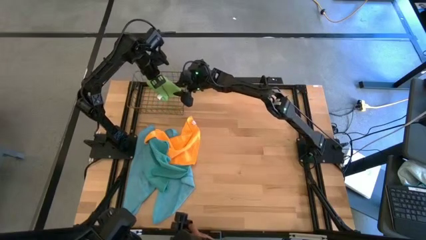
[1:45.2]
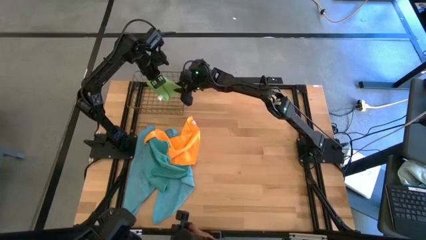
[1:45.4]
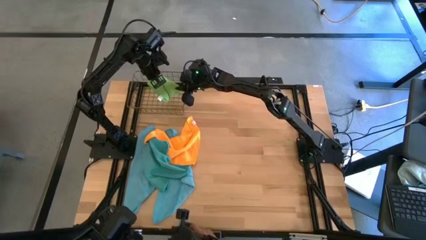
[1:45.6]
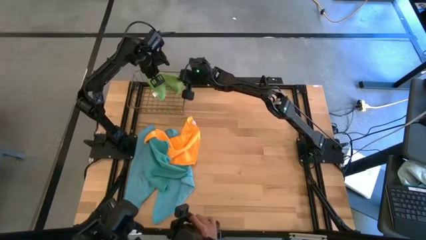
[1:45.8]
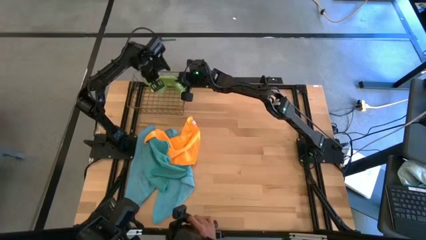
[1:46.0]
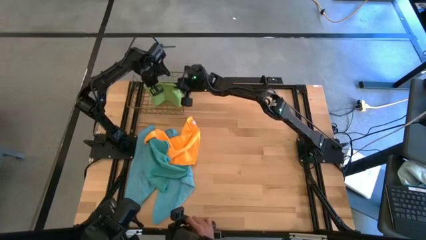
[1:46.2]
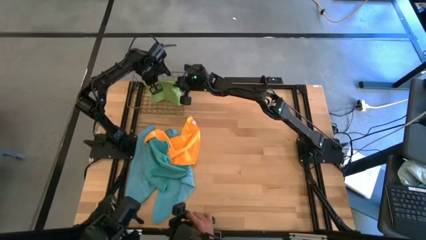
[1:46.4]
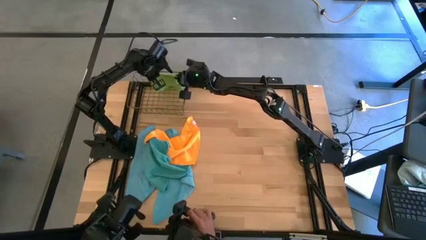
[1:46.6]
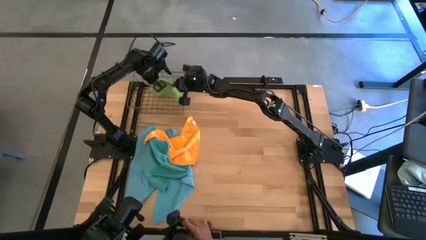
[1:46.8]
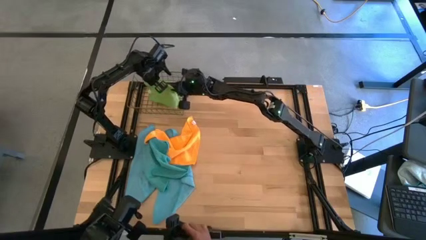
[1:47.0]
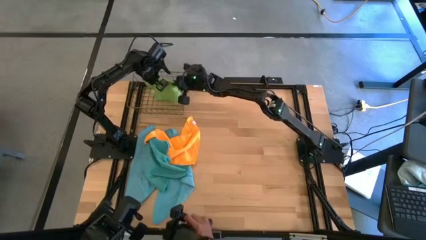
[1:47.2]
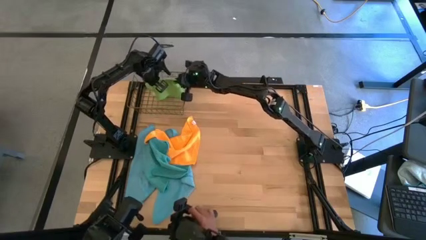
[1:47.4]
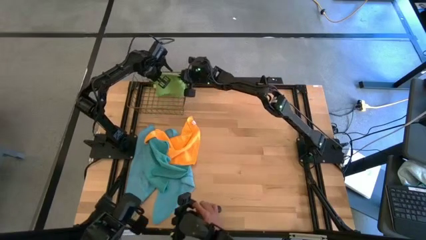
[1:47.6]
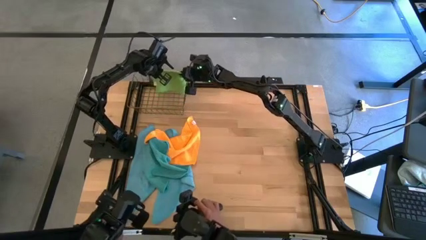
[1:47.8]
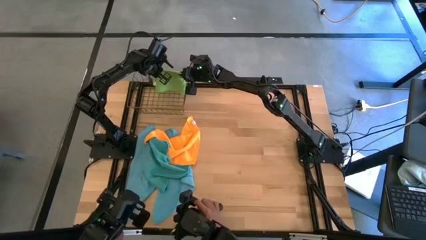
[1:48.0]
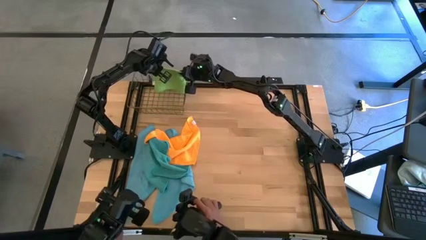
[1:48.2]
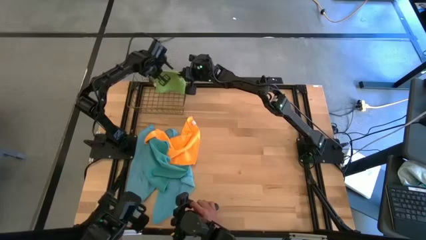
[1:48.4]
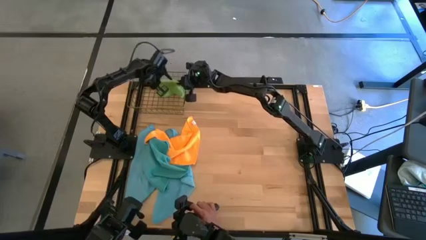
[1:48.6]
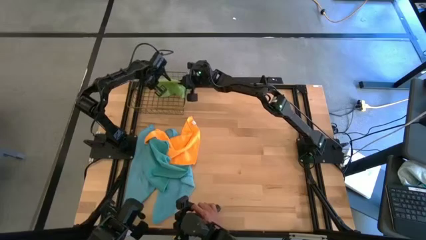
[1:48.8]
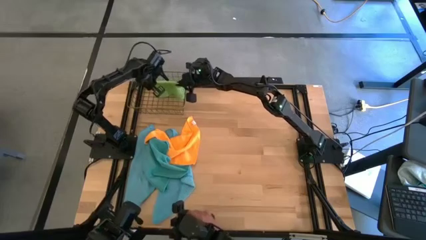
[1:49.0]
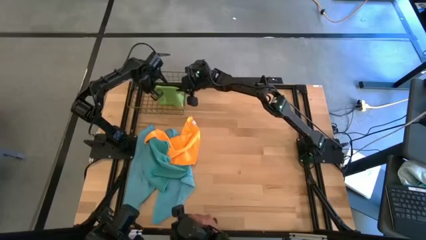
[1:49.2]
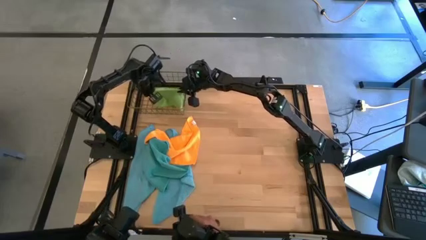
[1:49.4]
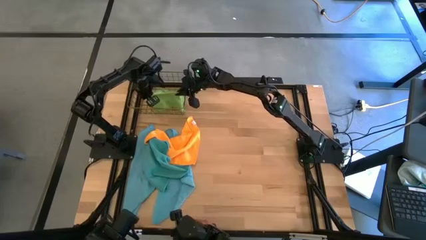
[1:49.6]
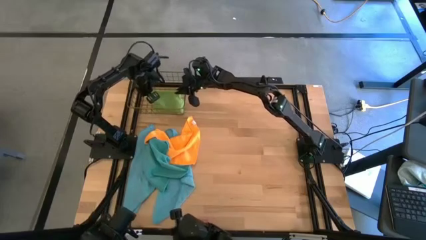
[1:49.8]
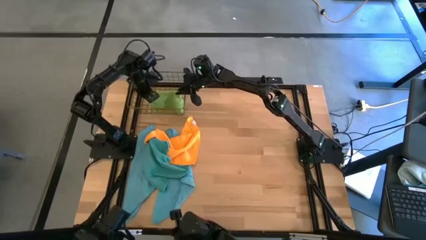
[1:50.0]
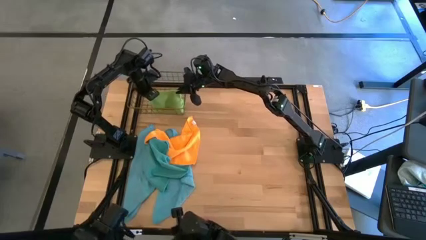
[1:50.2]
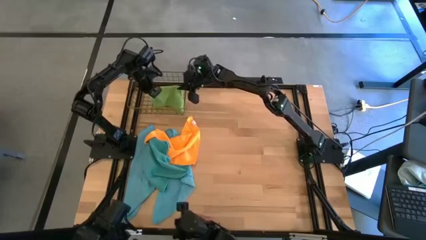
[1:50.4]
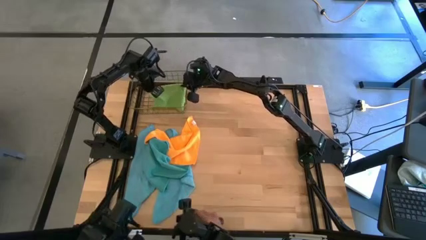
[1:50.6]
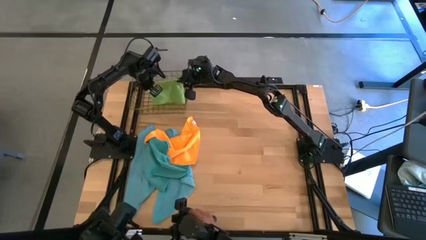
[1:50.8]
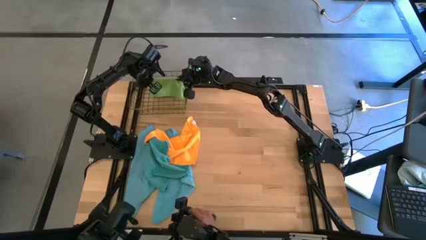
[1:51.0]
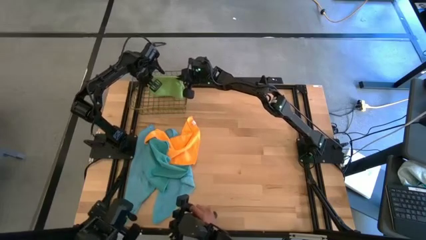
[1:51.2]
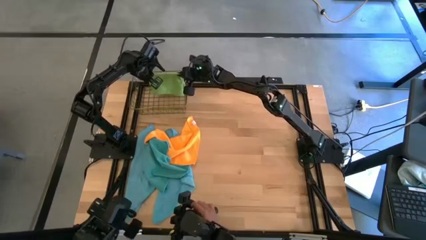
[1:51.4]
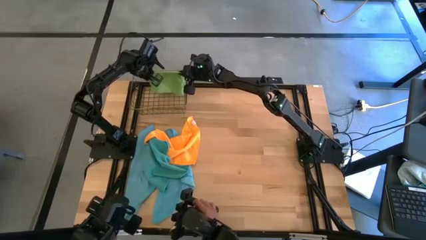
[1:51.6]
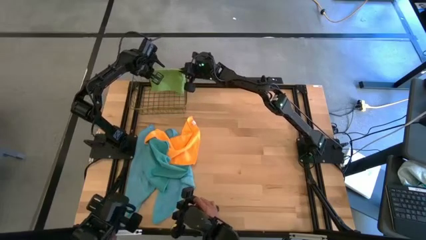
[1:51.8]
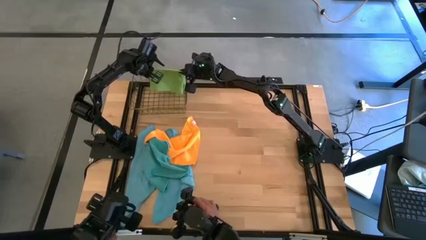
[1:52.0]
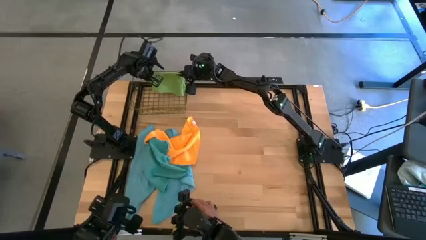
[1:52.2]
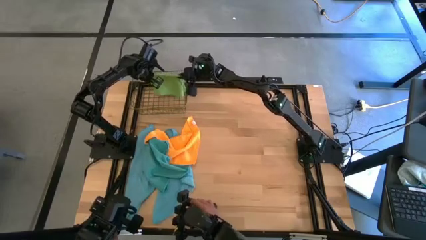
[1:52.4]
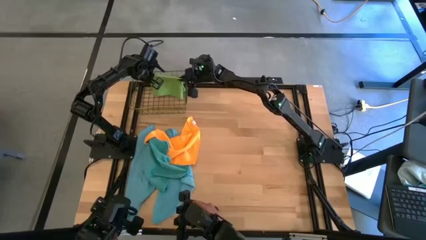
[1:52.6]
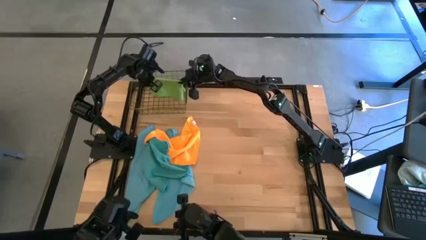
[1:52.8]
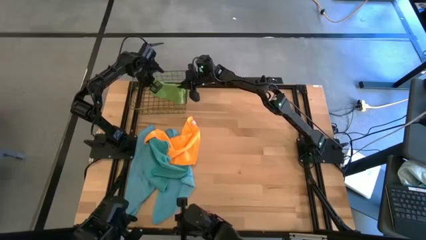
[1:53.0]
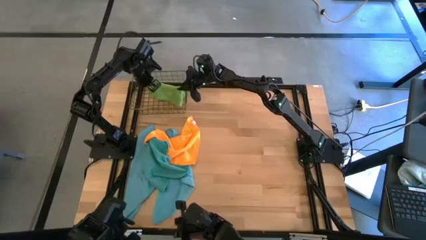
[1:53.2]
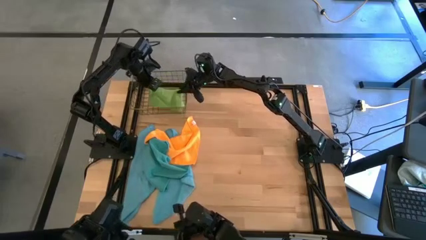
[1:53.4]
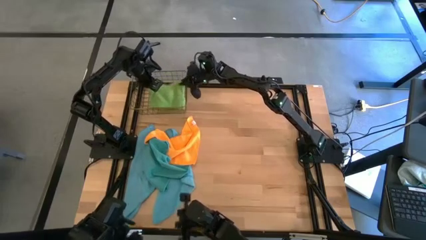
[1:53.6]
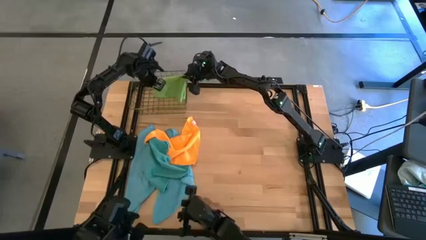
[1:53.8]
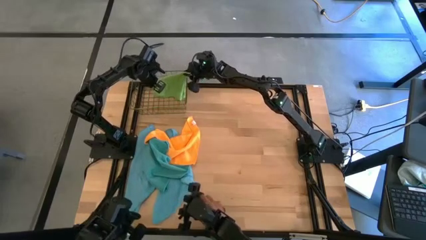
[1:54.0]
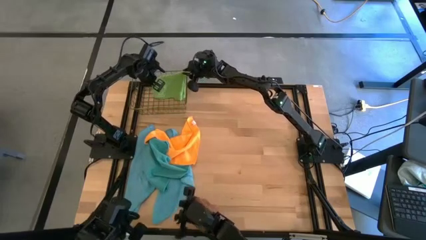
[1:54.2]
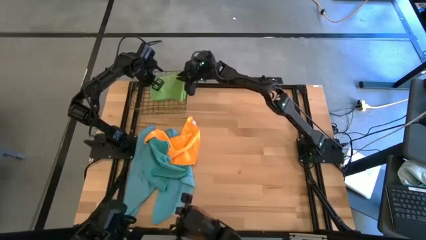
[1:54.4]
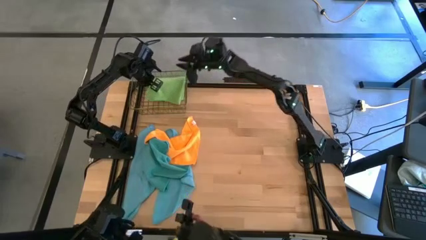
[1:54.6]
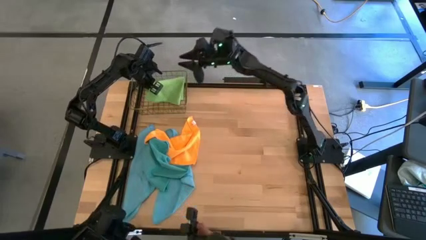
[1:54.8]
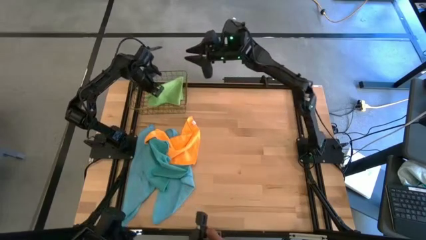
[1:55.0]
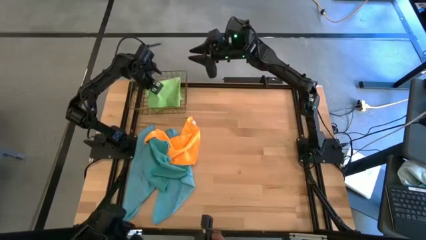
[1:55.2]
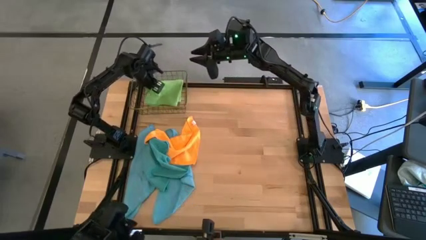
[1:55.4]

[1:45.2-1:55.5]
Task: Fold microfiber towels
Put the folded green microfiber cloth into the wire basket

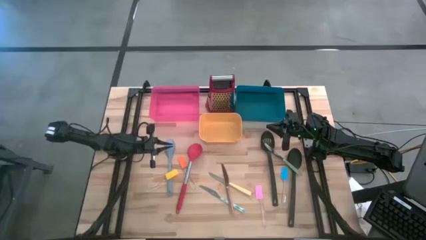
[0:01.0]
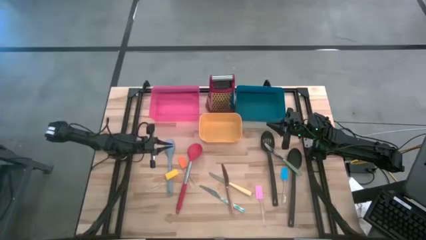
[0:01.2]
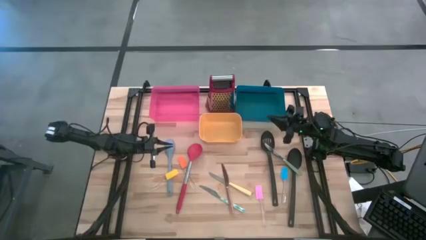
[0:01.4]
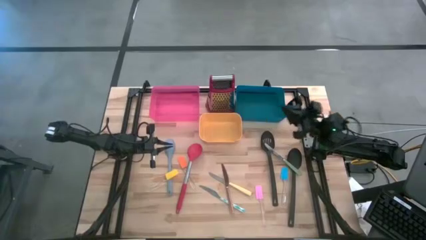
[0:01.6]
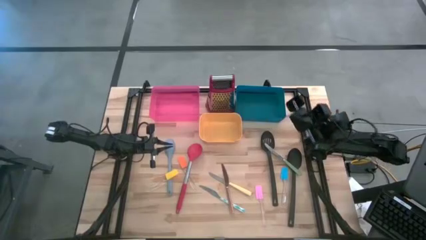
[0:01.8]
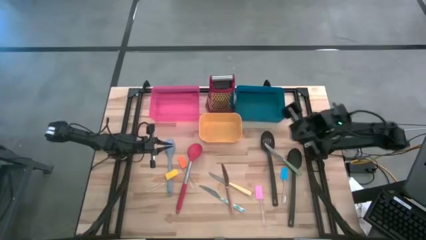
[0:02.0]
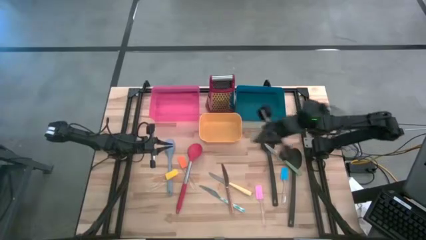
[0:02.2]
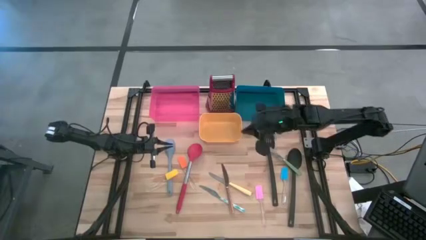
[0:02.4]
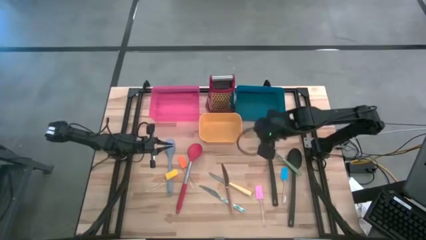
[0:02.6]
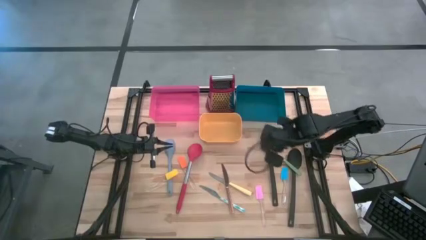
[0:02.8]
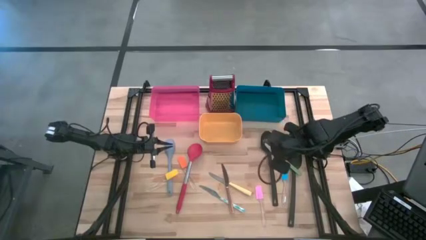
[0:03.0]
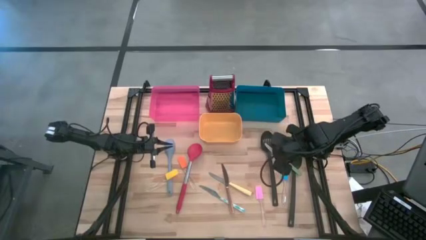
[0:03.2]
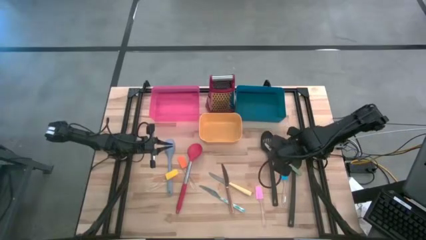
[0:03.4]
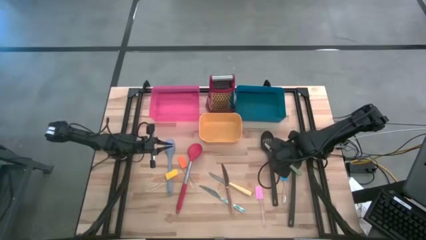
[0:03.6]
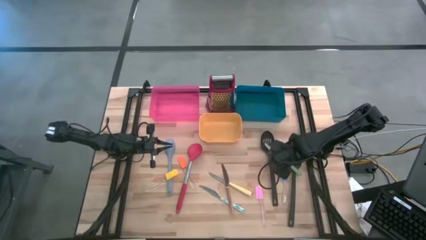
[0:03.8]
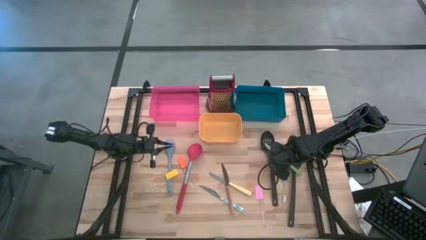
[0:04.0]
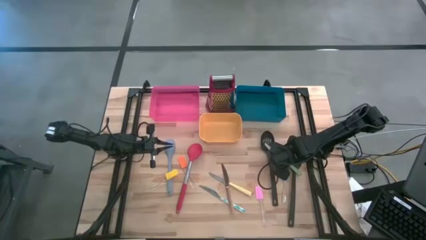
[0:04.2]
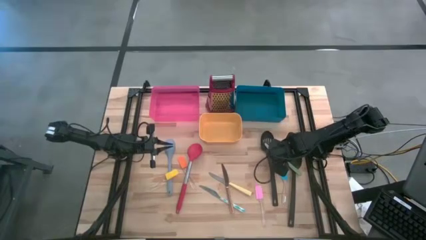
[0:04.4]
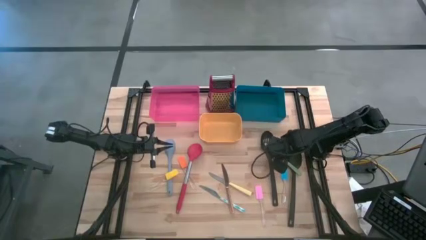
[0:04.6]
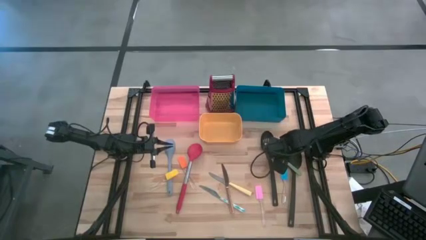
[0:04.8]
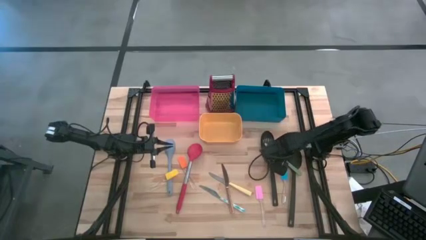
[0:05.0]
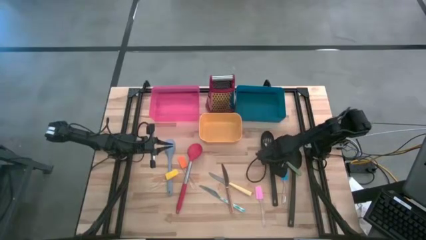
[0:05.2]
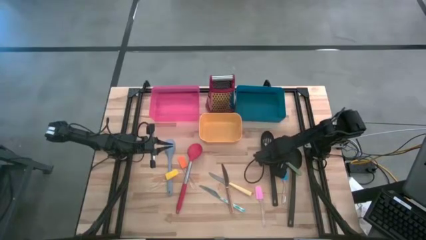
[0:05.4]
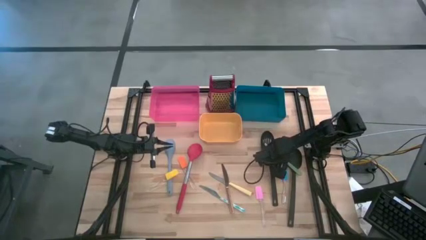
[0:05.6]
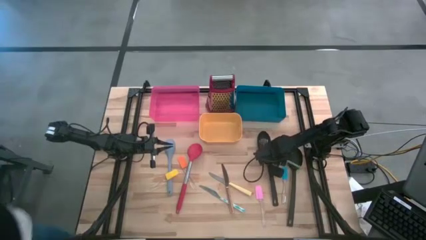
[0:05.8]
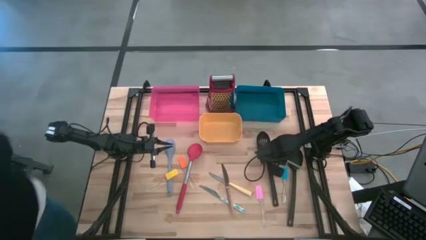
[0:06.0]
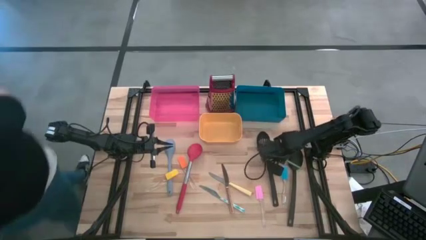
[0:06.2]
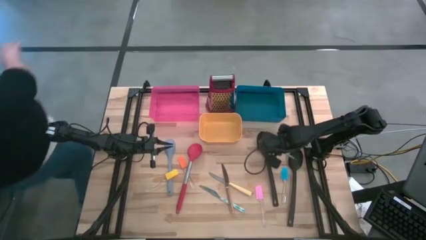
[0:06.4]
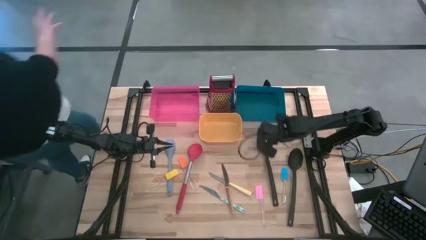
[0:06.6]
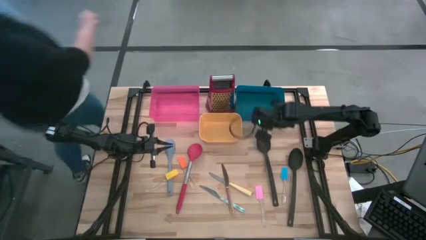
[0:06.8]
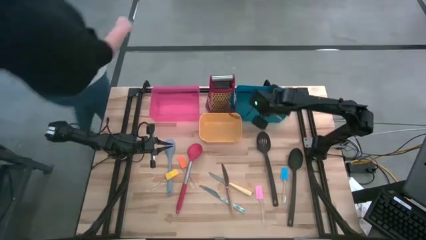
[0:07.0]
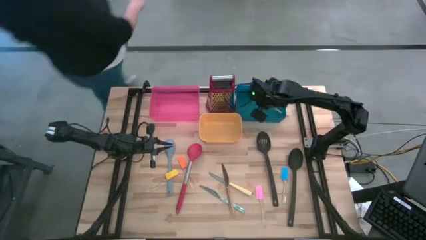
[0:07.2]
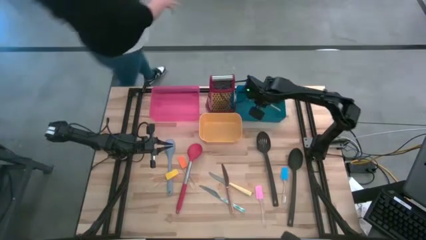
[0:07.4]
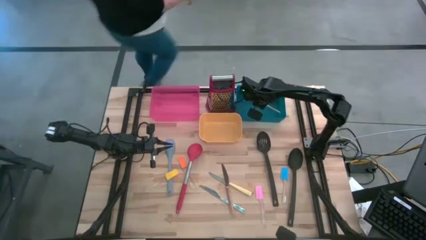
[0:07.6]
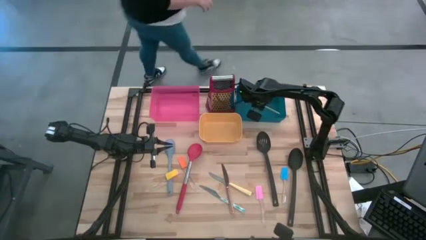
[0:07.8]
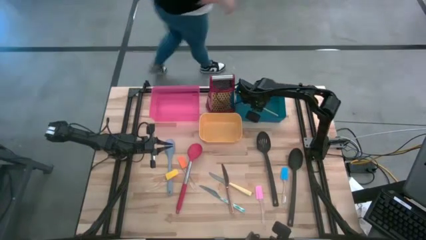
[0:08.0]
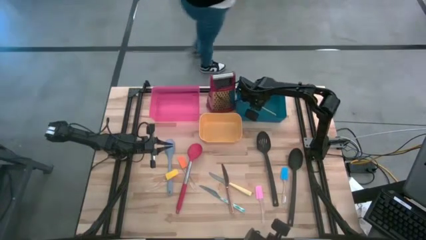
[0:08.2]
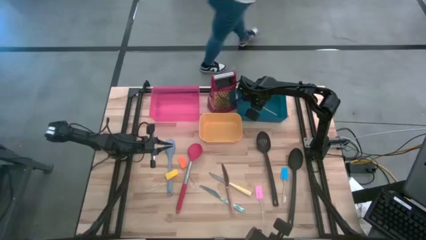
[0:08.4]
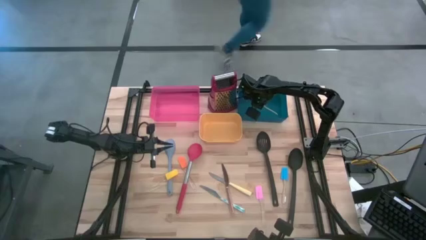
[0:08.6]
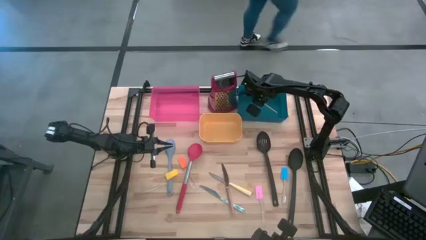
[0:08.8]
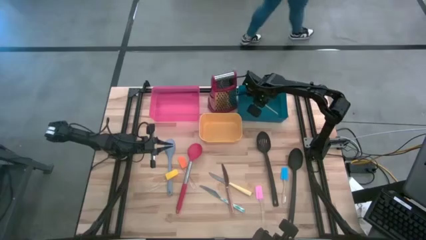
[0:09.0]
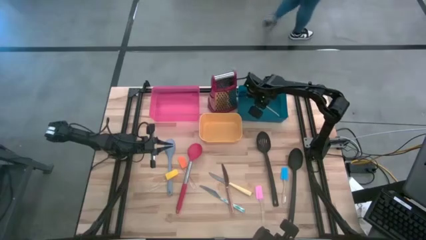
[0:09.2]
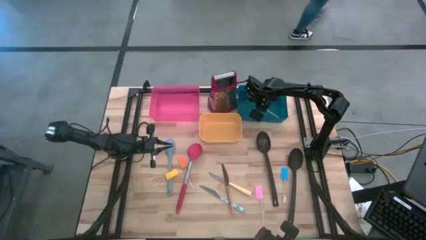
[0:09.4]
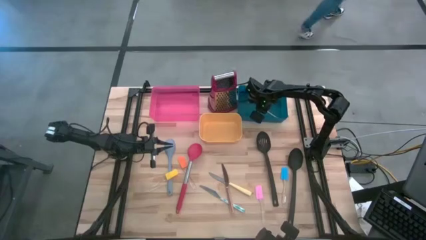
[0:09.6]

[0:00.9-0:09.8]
Task: Pick & Place Kitchen Items
Put the green table knife into the blue bin
